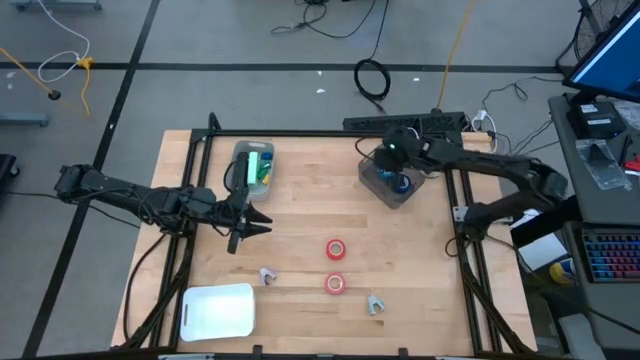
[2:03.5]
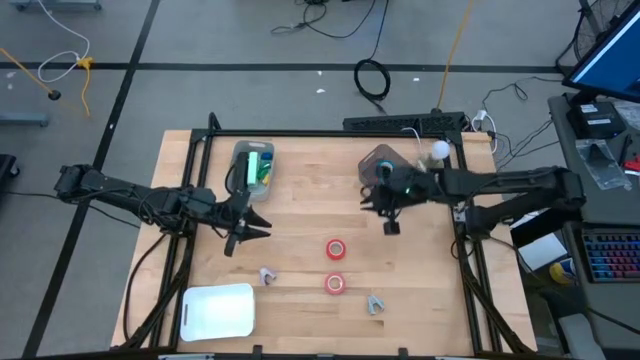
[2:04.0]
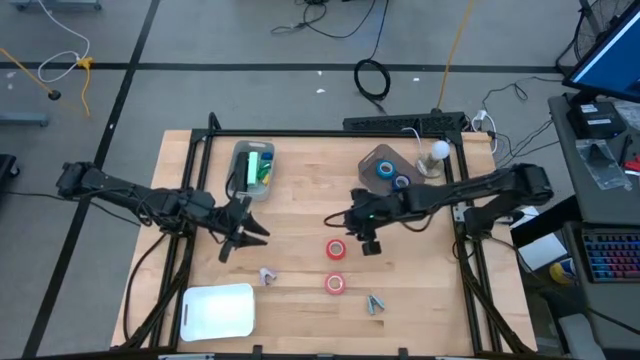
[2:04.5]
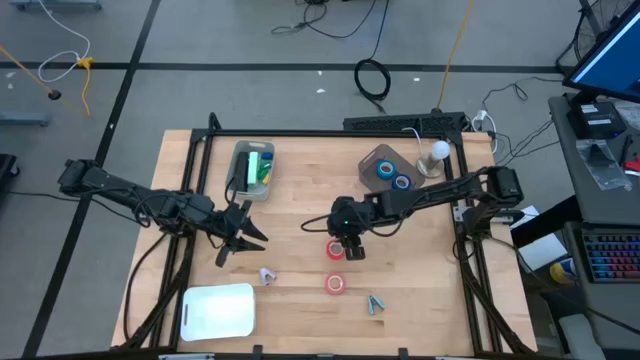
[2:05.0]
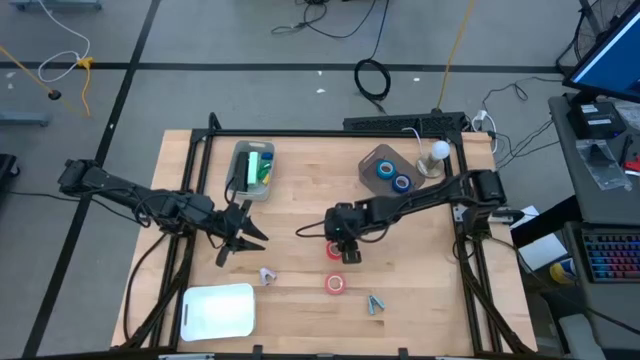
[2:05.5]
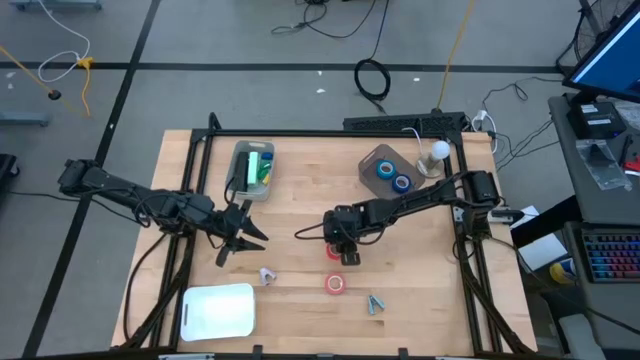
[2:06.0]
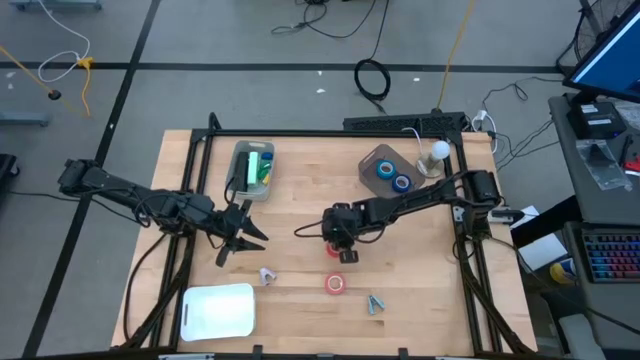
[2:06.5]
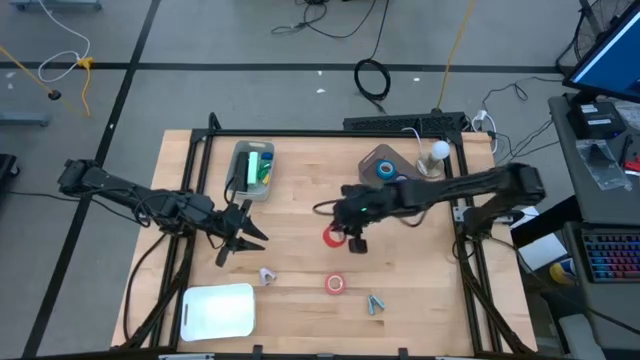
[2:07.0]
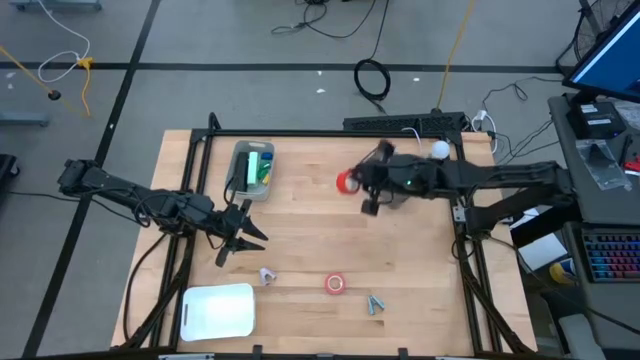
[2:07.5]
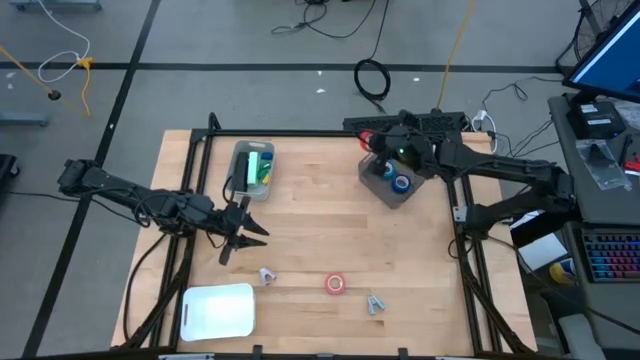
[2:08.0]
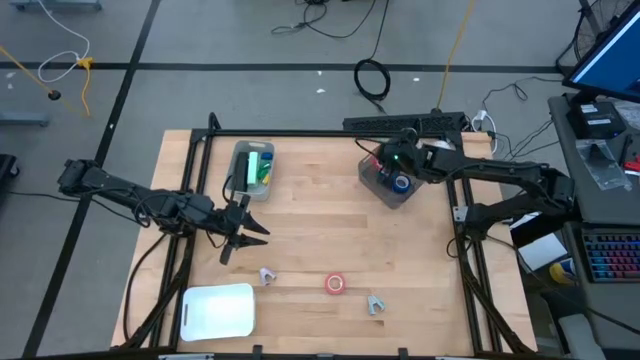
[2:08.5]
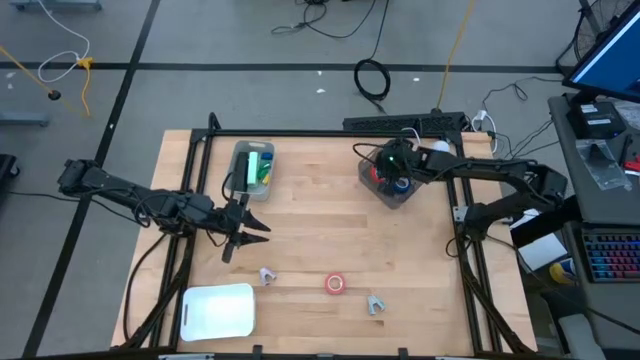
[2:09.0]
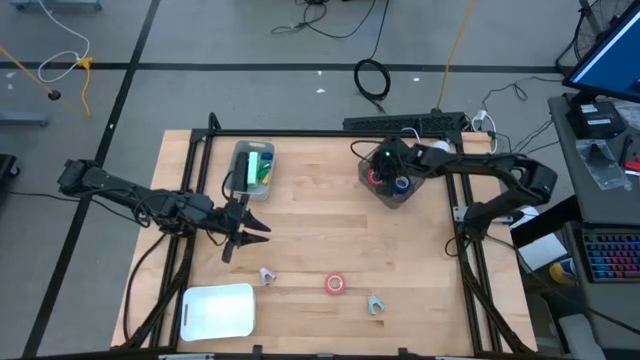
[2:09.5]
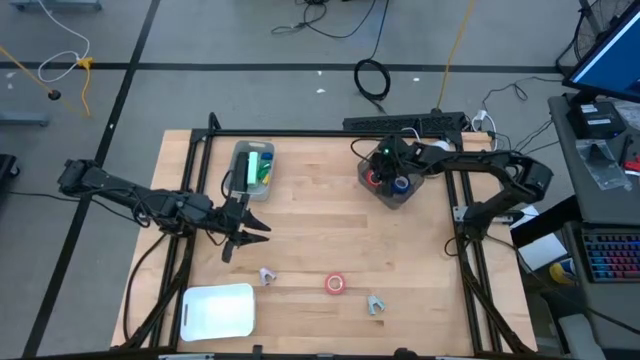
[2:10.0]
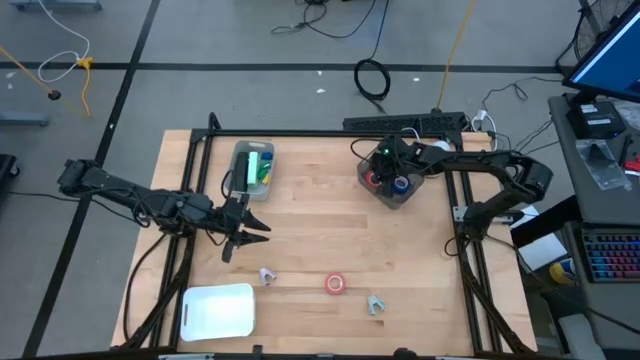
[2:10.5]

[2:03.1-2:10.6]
Task: Pick and place Stapler, Stapler remover, tape
Put the orange tape into the black bin

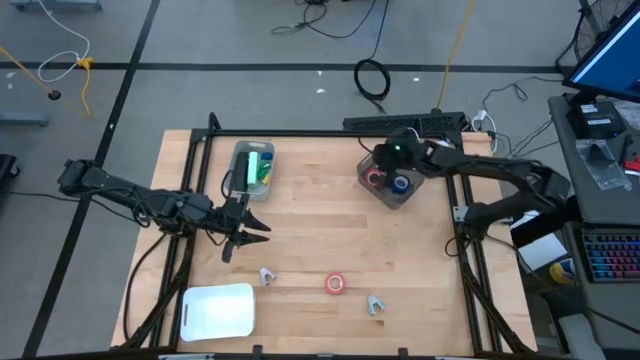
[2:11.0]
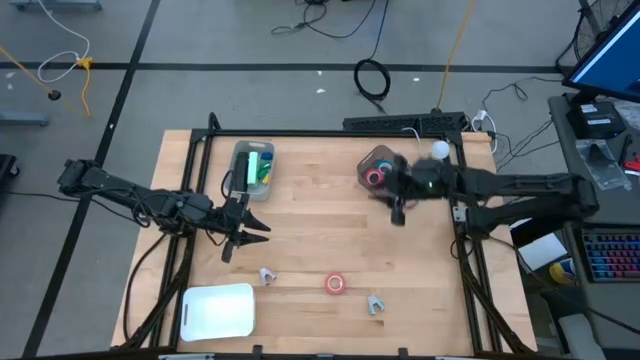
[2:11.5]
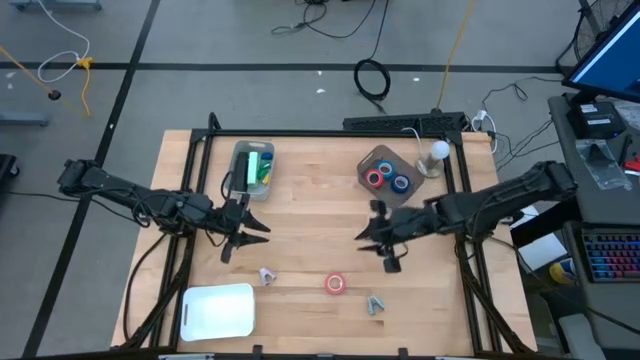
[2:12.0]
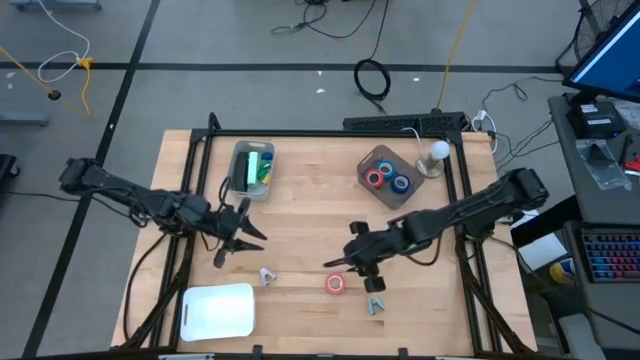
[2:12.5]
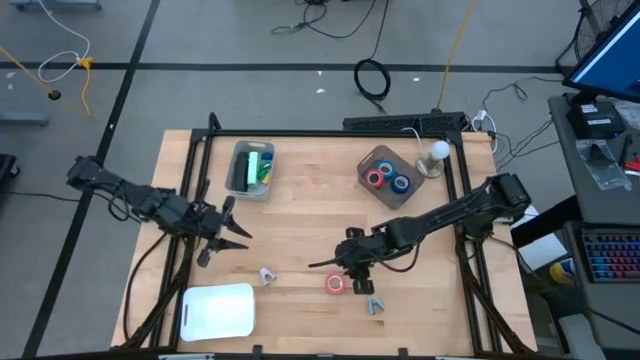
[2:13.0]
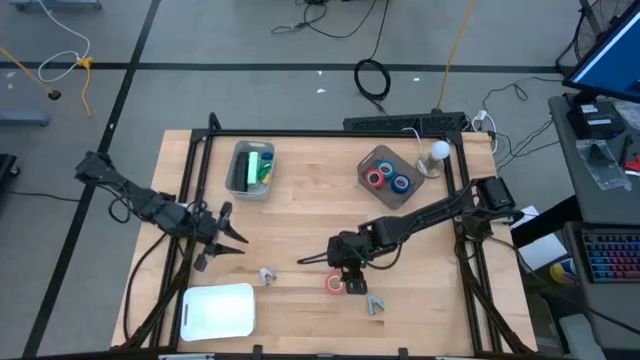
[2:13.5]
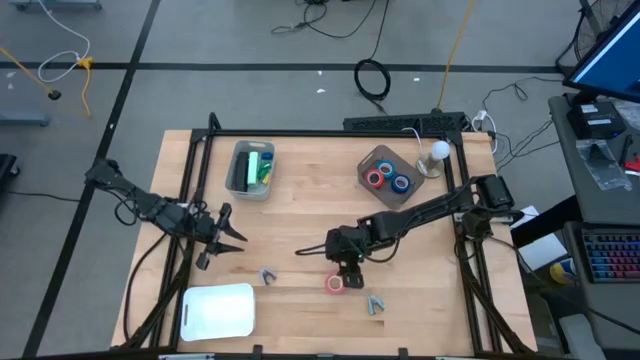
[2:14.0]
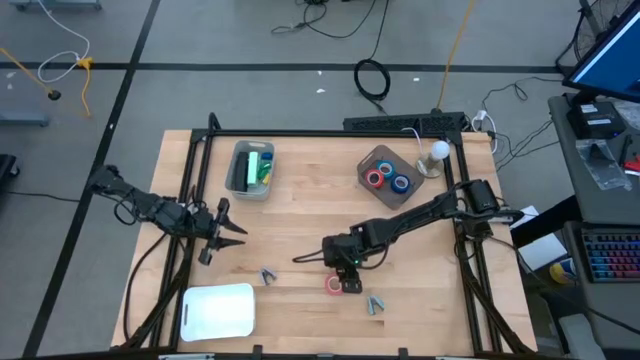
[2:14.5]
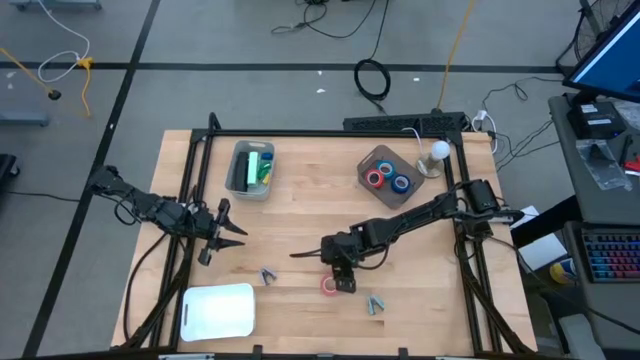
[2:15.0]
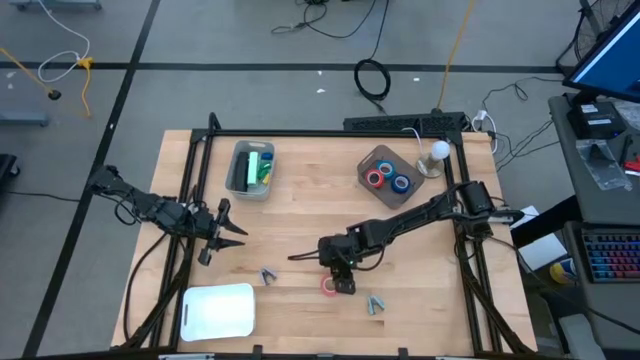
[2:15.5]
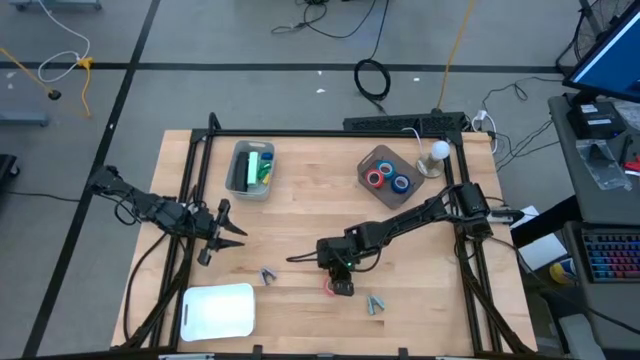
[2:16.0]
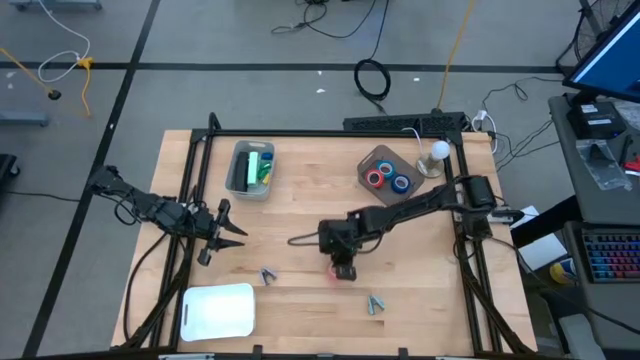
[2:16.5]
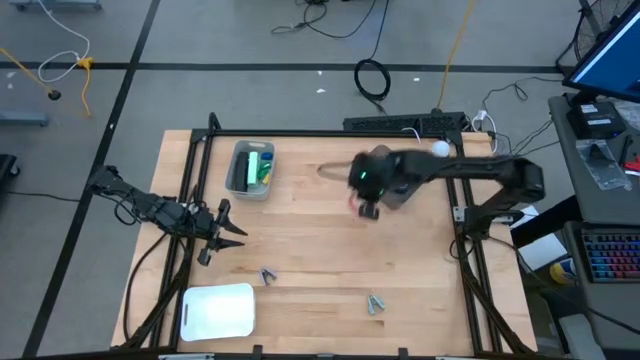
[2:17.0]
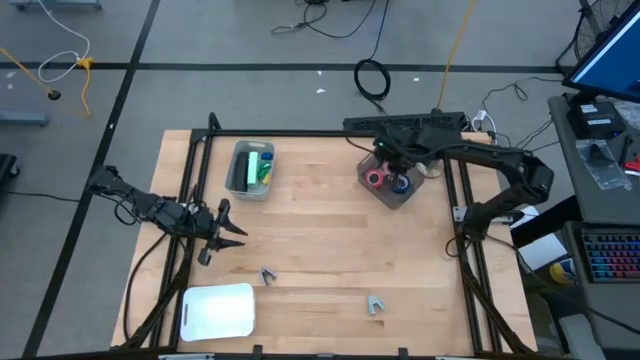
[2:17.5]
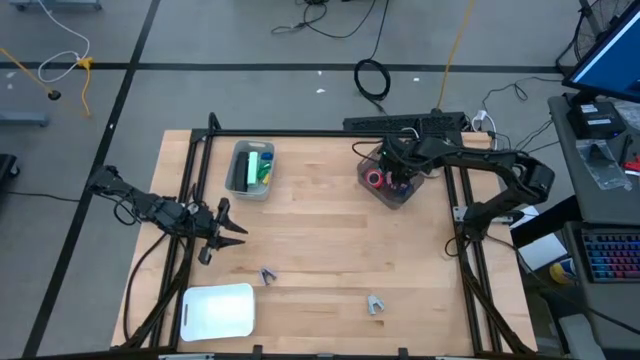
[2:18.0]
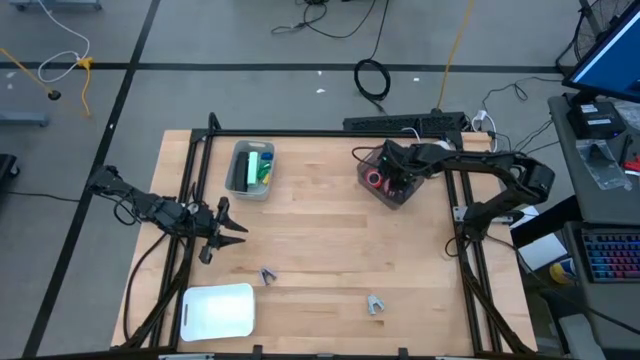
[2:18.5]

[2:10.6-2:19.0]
Put the pink tape into the black bin

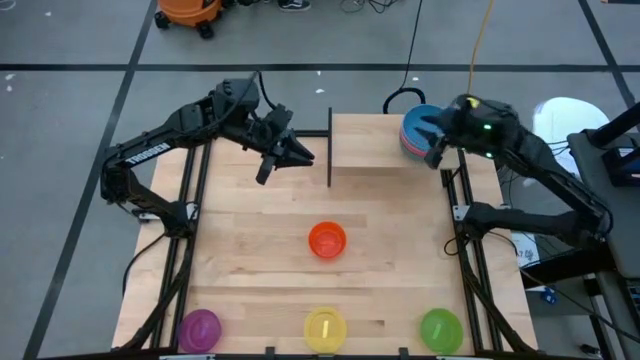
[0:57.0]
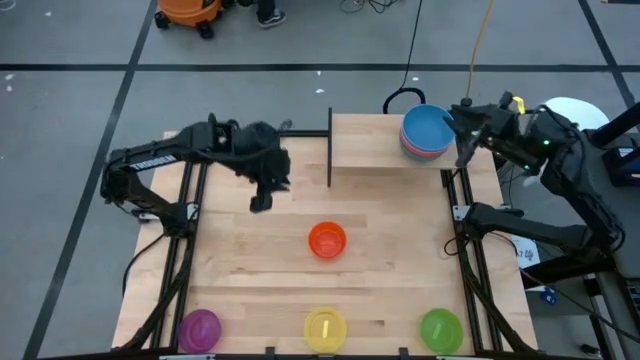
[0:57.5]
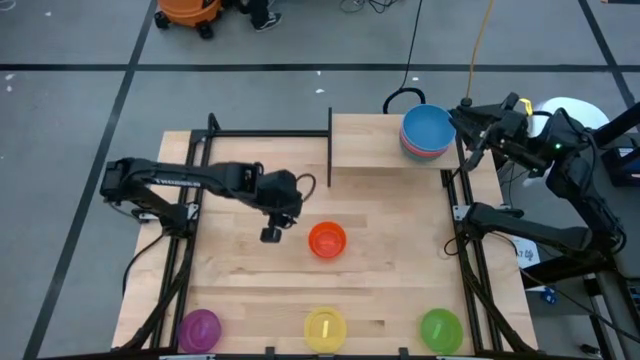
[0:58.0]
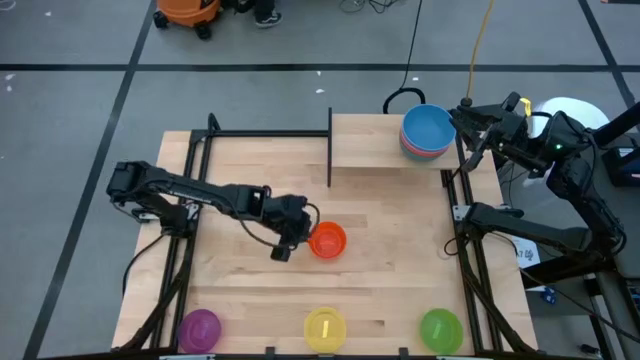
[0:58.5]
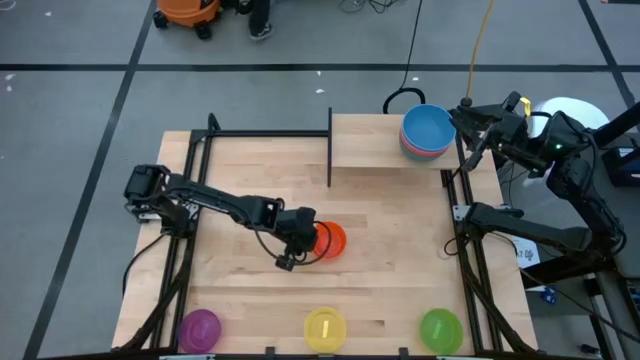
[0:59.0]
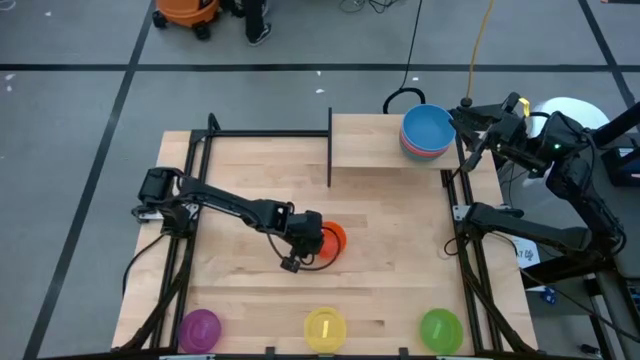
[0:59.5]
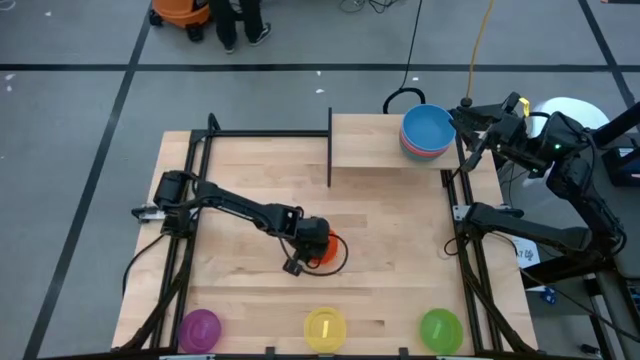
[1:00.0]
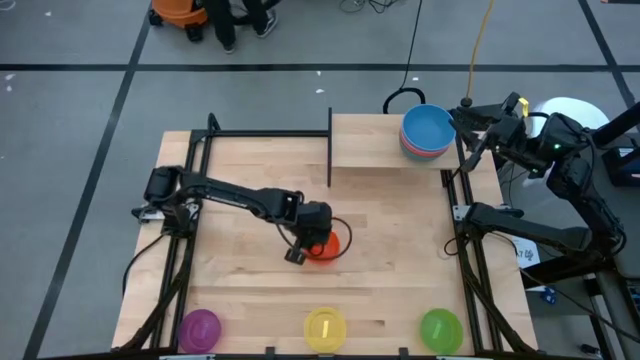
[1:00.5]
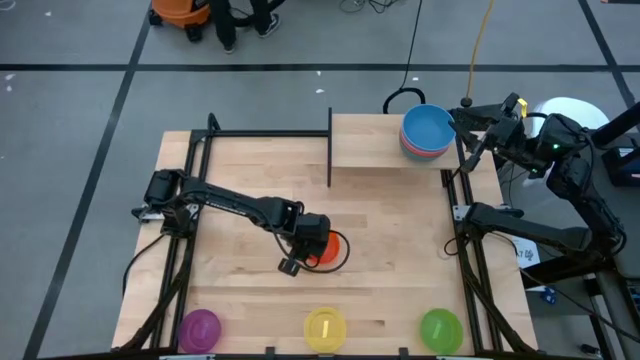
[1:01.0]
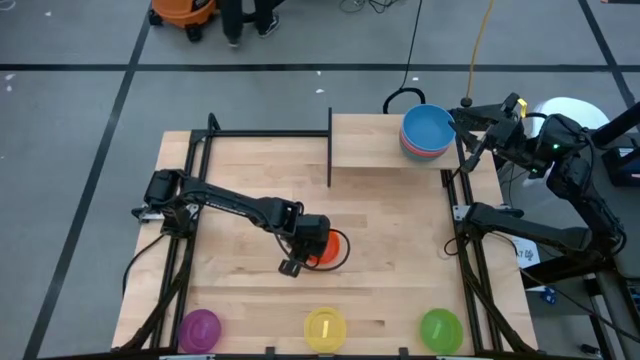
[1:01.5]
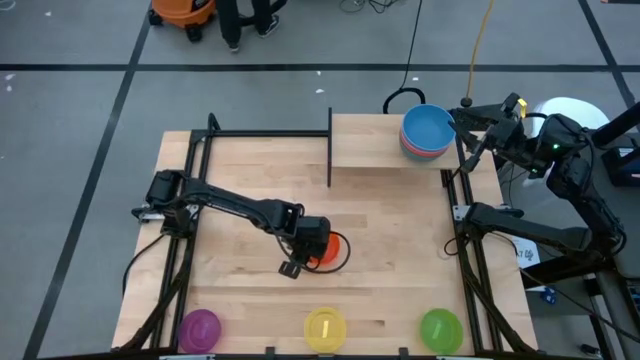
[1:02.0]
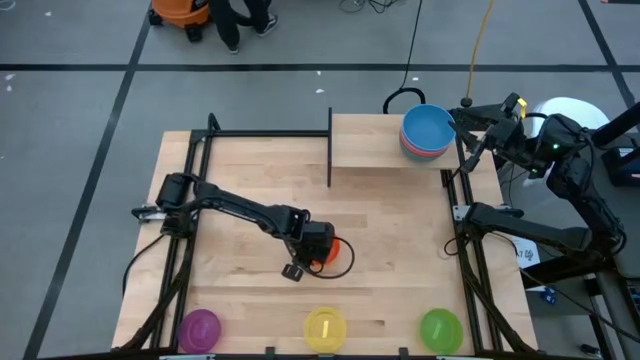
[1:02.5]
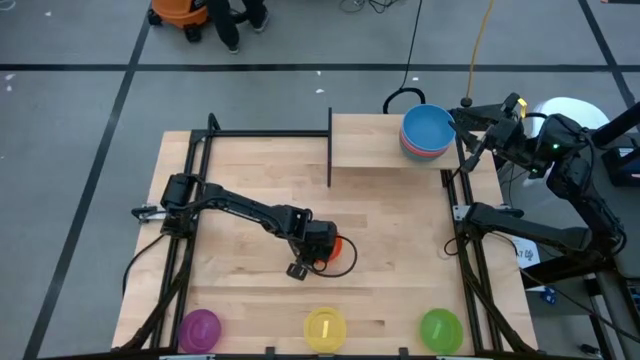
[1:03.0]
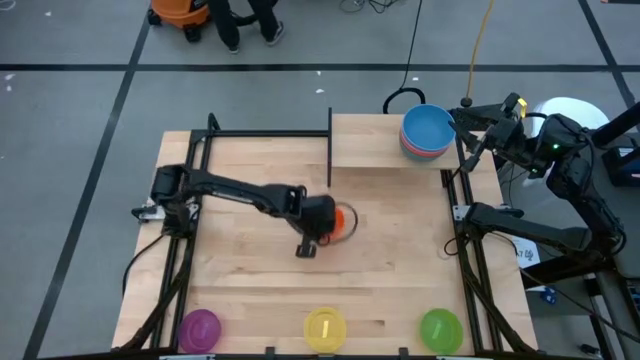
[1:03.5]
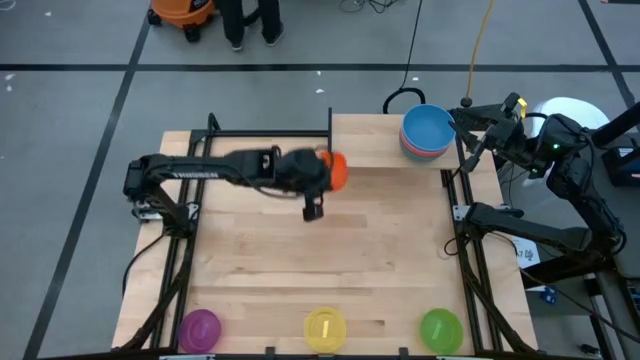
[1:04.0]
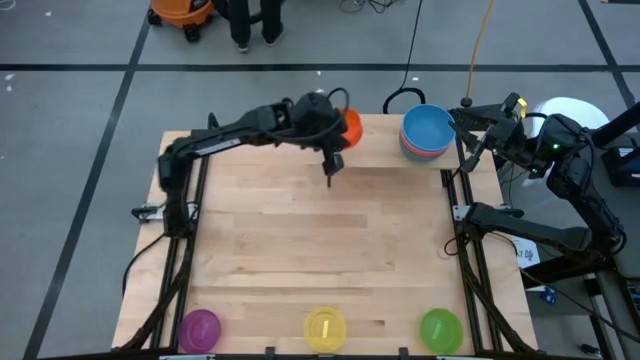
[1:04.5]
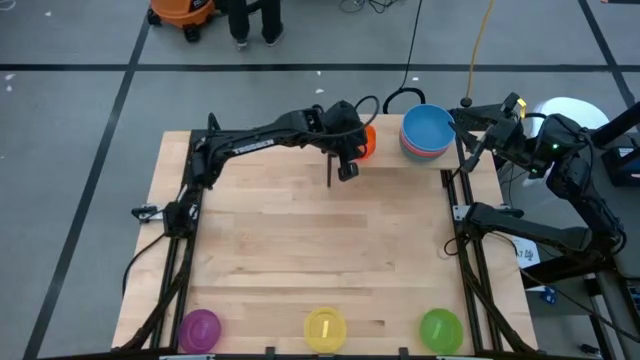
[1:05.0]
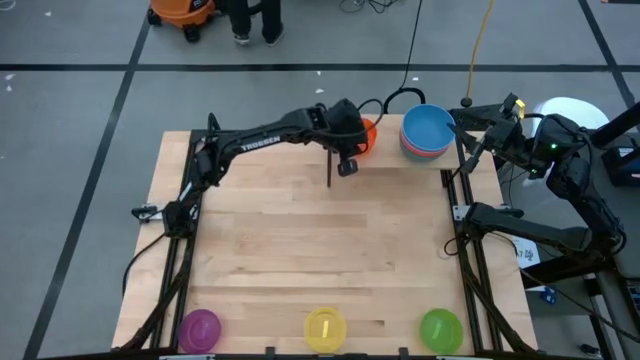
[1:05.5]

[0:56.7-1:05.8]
Task: Place and stack bowls onto a shelf
Put the orange bowl on the shelf
